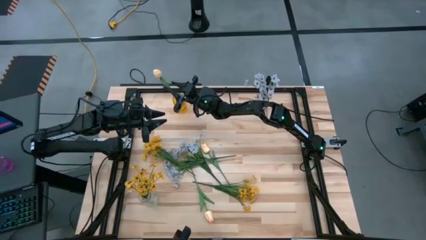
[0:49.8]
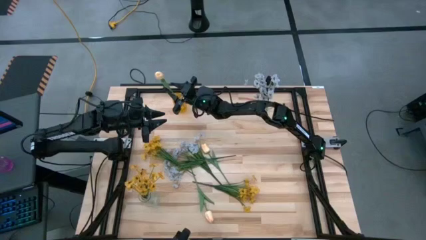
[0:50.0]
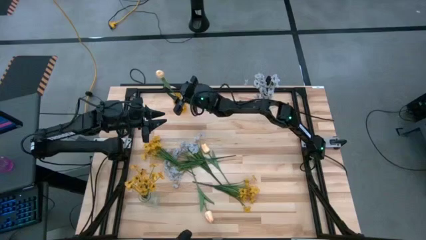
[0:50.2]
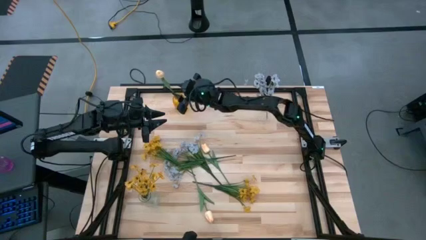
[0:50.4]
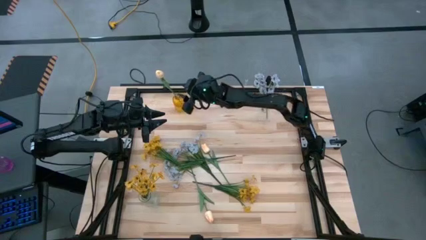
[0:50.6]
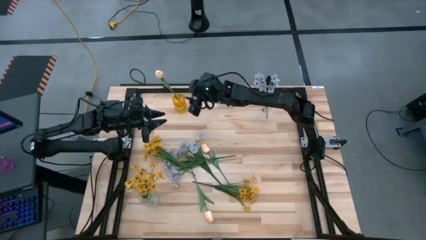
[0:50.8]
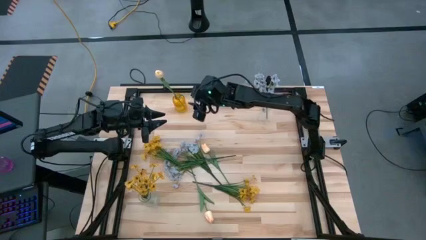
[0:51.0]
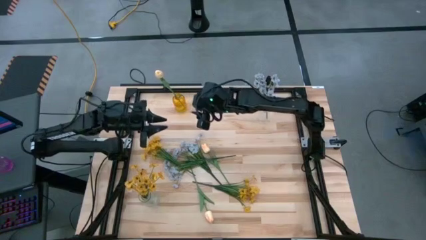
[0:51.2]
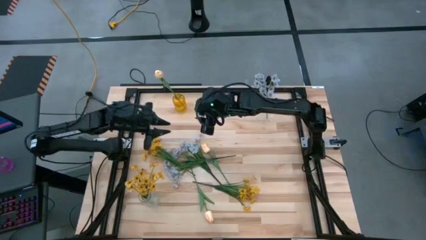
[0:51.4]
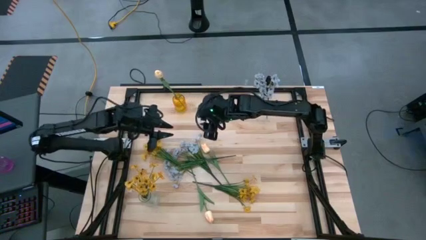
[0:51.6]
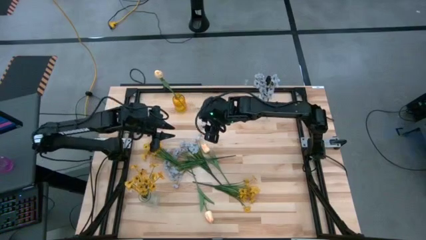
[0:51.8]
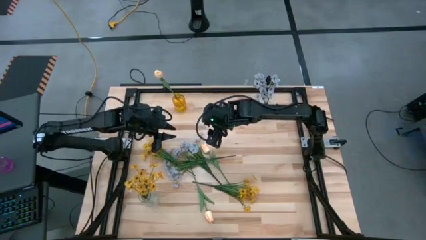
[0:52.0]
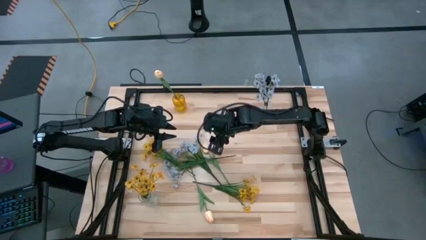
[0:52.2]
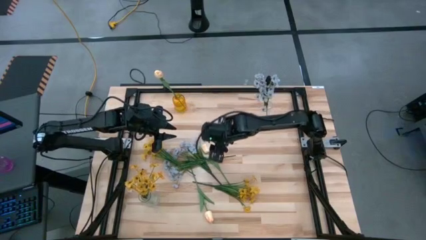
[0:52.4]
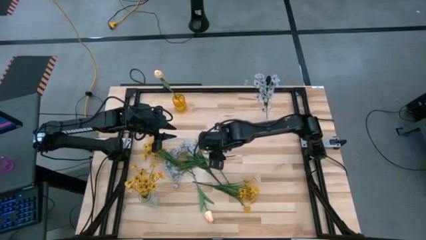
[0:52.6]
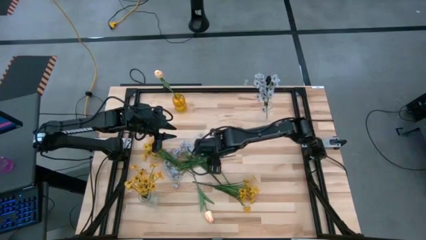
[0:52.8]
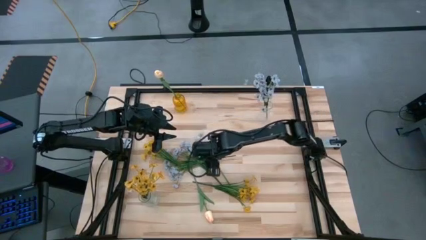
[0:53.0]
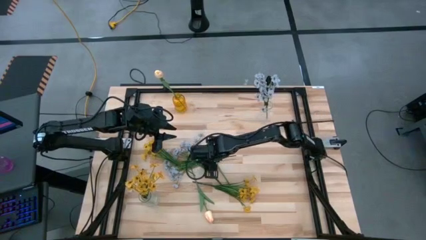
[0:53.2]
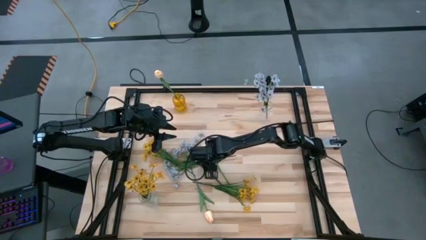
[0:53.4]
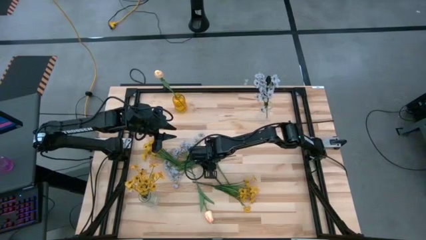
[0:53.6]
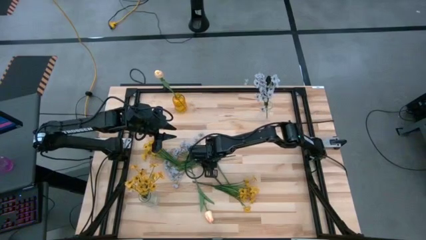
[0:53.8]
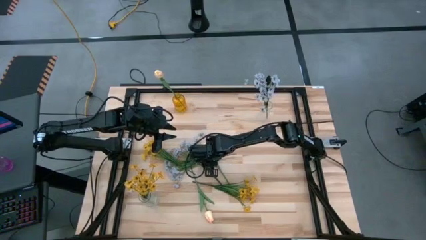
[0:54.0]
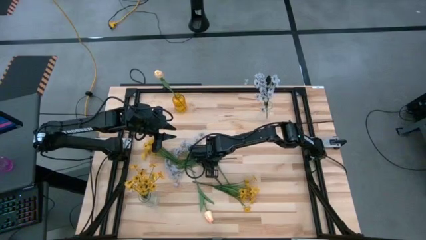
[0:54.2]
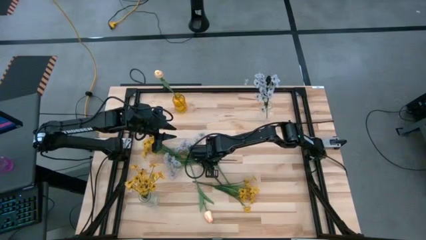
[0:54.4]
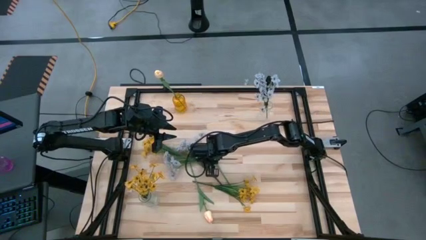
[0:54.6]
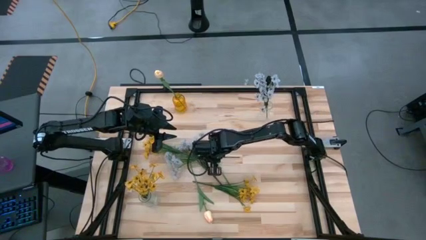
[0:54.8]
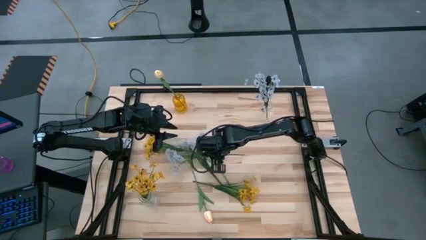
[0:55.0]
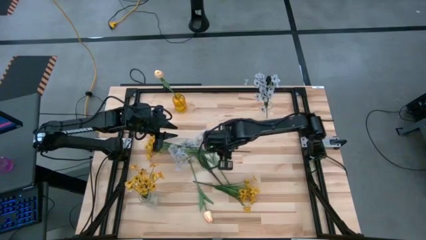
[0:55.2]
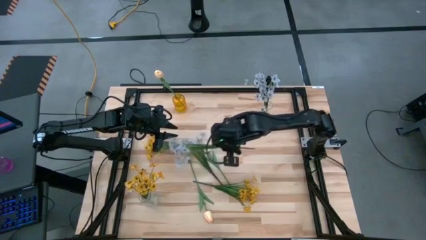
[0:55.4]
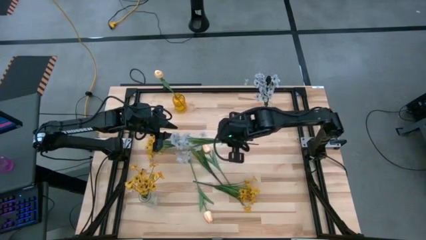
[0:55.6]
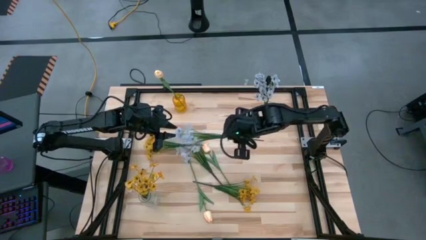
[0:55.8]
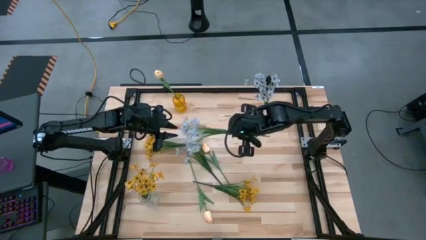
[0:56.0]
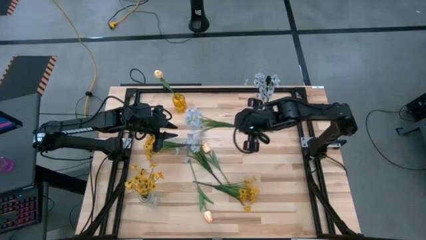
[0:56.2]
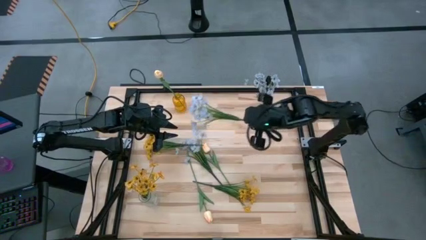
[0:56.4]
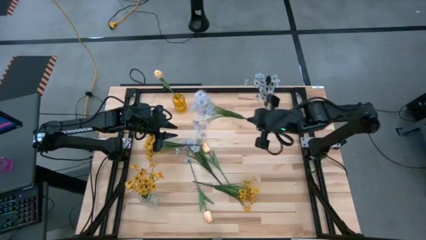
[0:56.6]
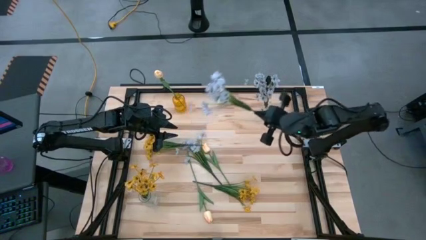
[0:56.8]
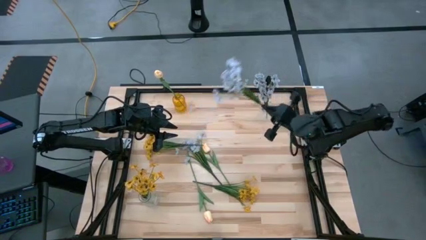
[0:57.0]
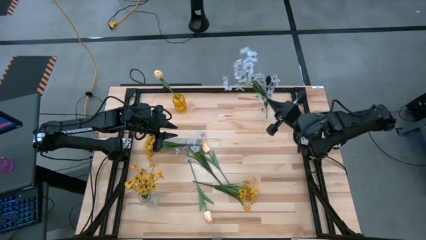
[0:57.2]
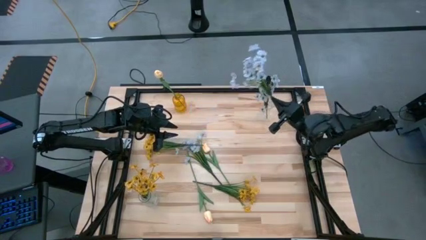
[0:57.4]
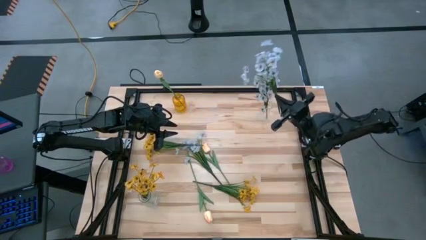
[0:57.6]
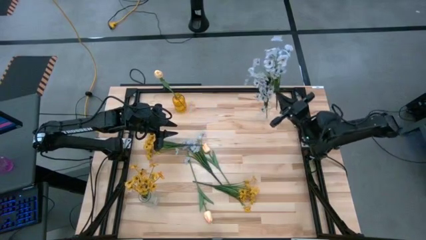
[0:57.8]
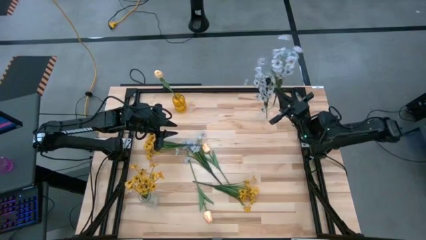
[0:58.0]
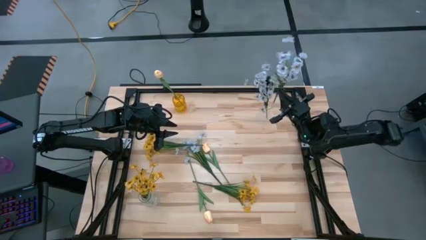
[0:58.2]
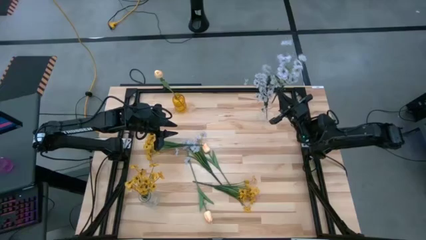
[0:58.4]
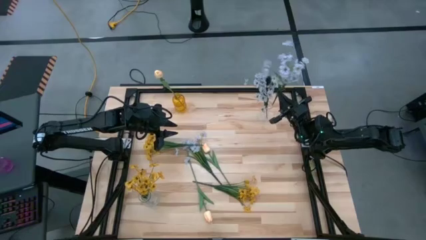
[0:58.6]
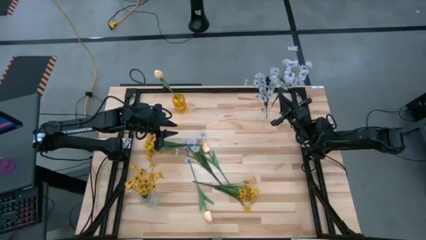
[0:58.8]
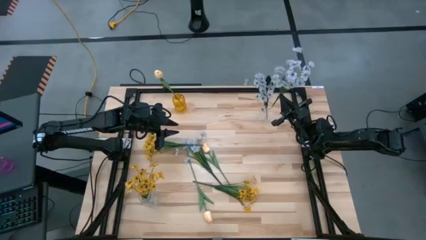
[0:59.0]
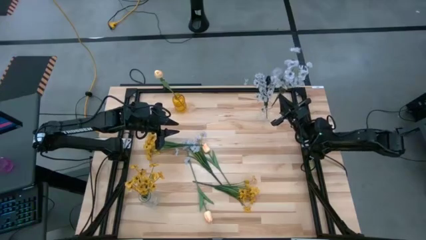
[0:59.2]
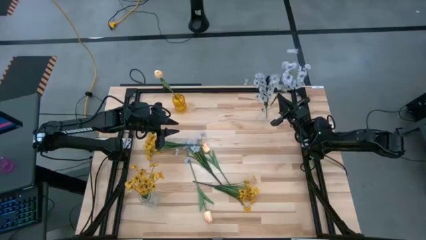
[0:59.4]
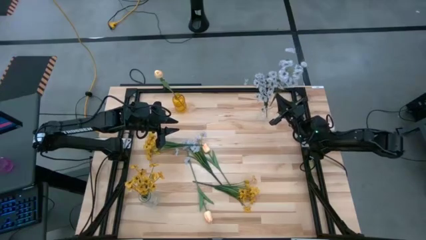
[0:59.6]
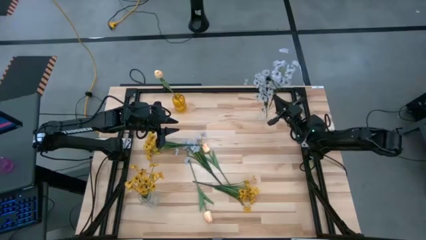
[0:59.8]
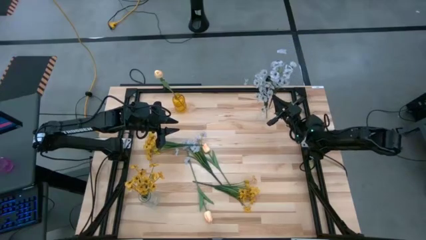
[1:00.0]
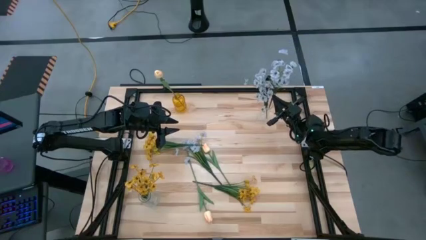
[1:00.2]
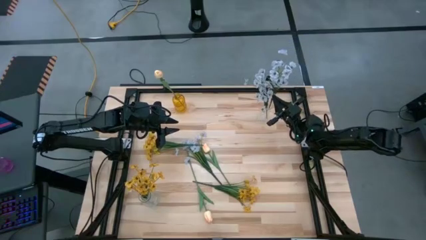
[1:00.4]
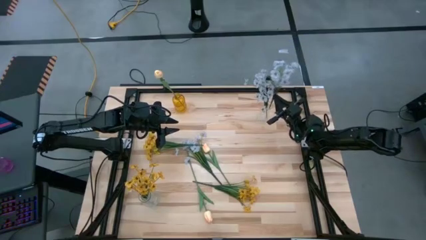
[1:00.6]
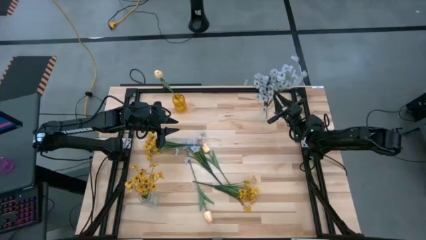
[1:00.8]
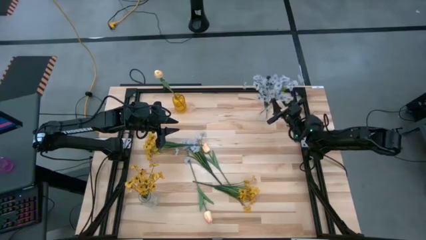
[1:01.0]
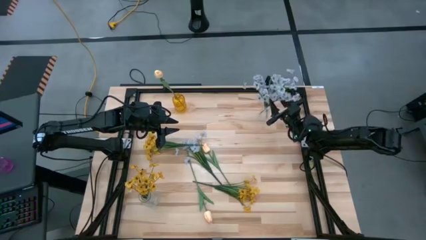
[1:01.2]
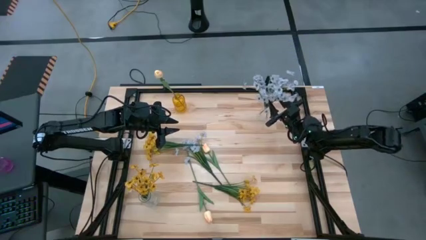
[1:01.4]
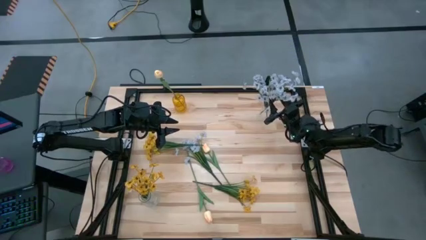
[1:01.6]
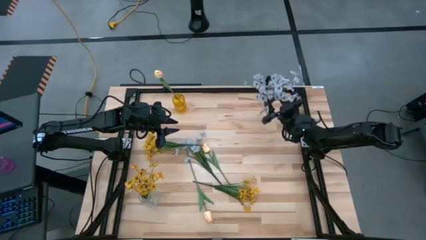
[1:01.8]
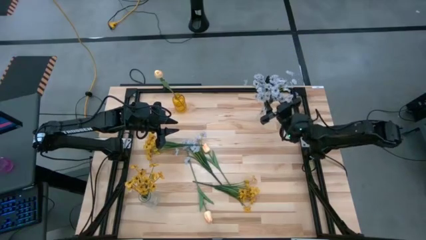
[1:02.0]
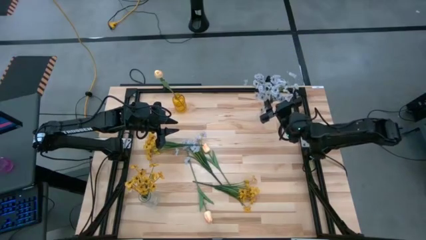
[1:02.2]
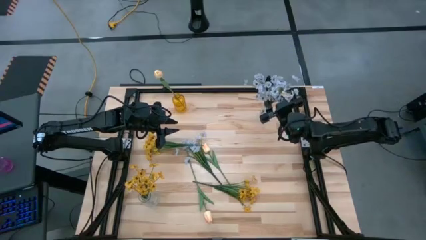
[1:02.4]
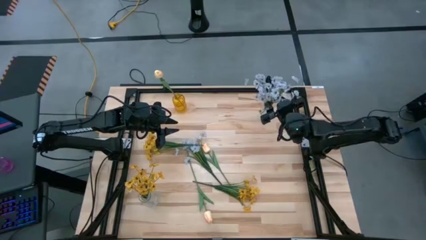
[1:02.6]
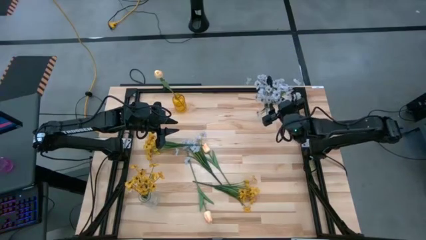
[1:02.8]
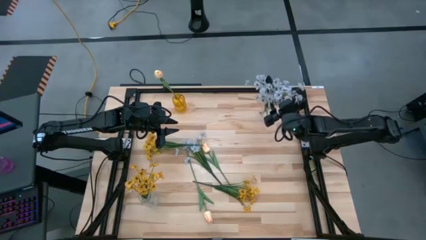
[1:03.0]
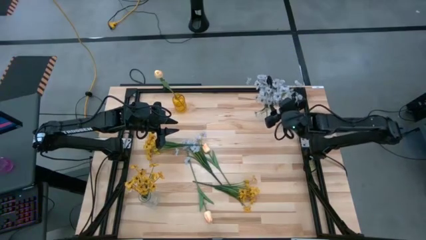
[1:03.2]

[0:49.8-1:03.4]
Task: Sort flowers into vase by color
Put the left white flowers into the top transparent vase
